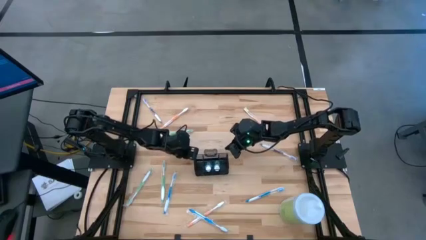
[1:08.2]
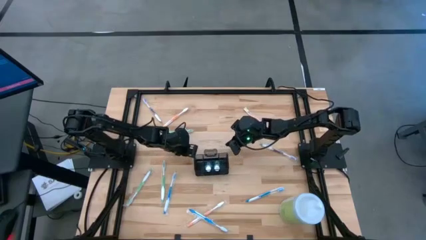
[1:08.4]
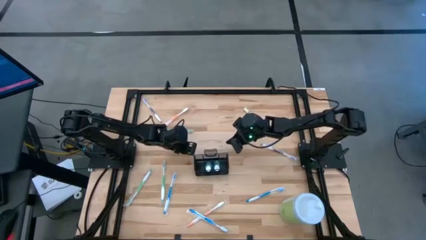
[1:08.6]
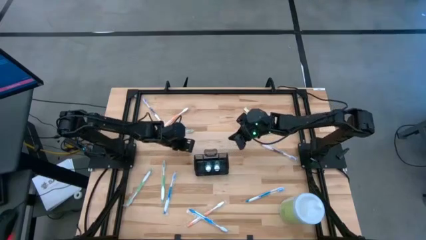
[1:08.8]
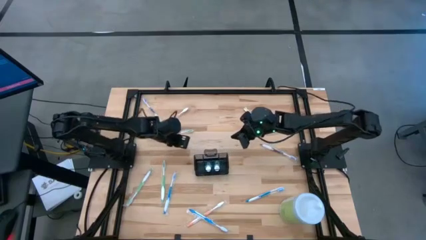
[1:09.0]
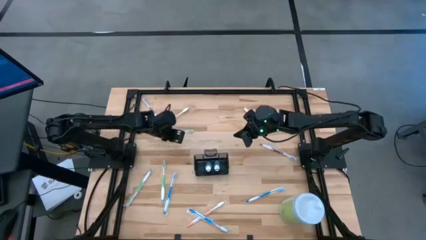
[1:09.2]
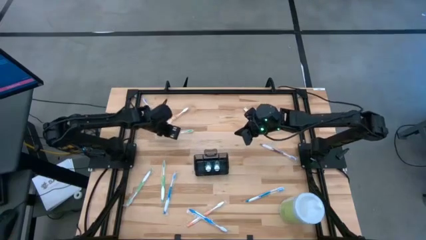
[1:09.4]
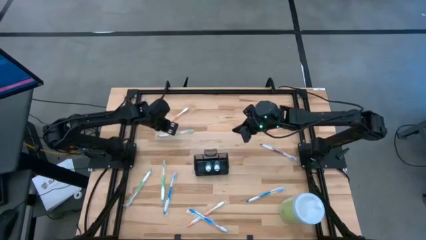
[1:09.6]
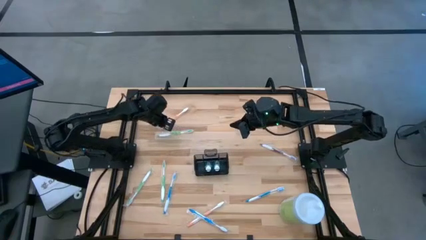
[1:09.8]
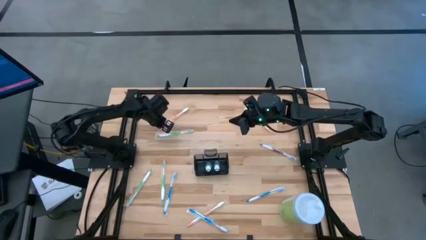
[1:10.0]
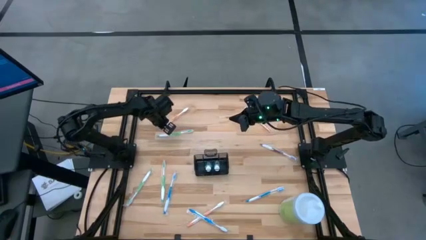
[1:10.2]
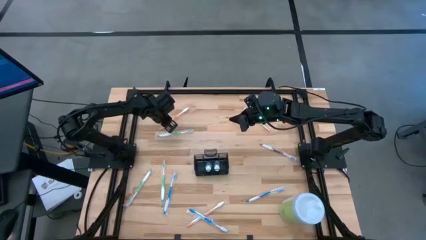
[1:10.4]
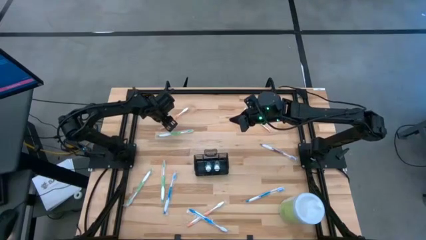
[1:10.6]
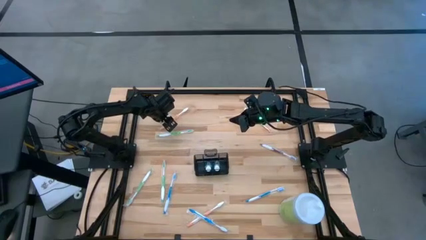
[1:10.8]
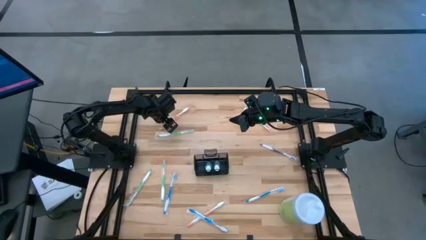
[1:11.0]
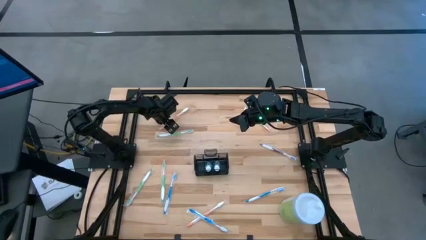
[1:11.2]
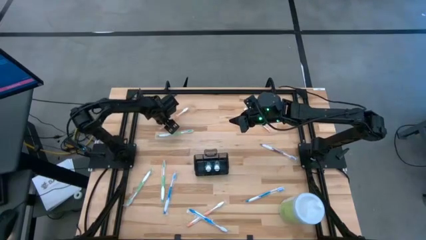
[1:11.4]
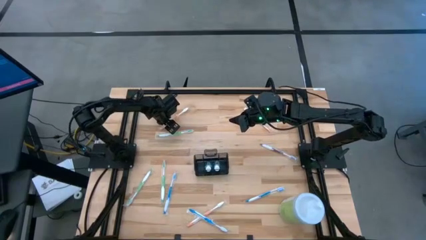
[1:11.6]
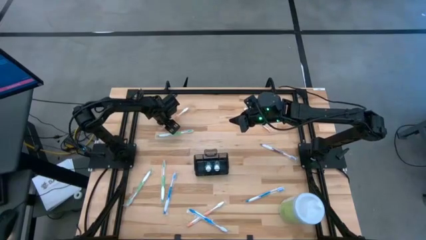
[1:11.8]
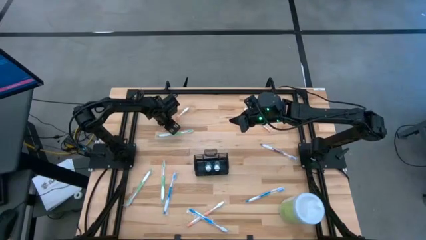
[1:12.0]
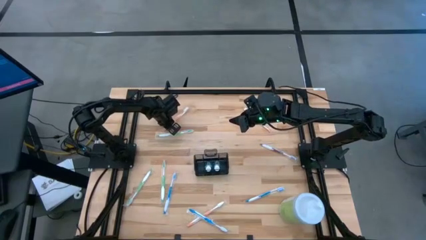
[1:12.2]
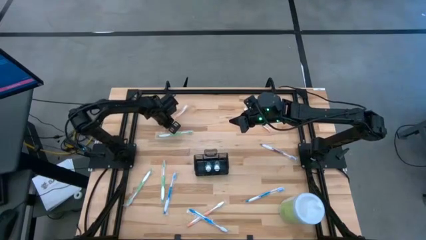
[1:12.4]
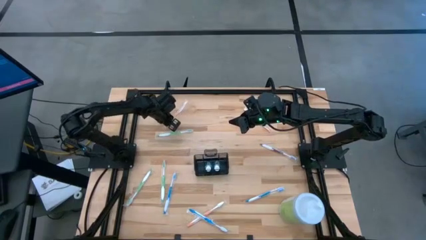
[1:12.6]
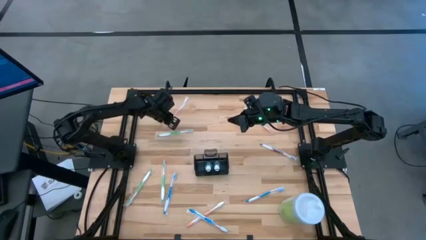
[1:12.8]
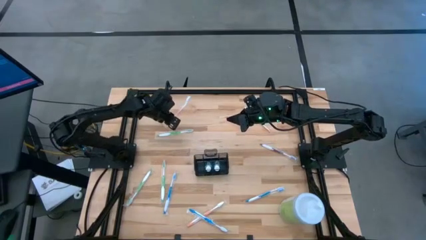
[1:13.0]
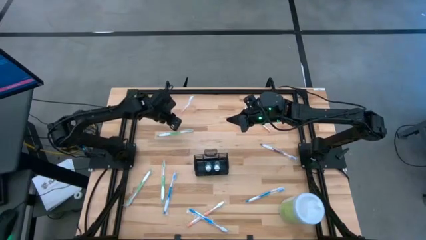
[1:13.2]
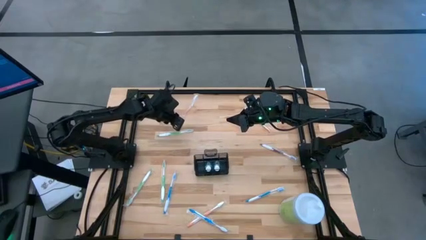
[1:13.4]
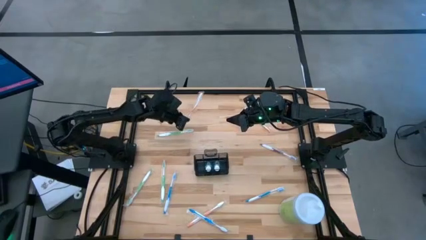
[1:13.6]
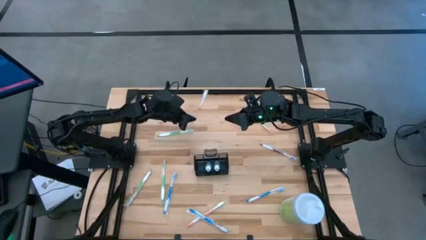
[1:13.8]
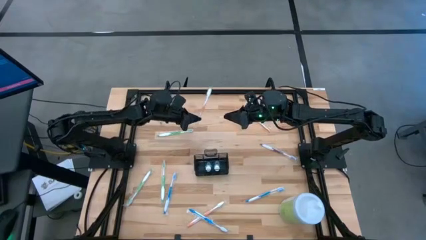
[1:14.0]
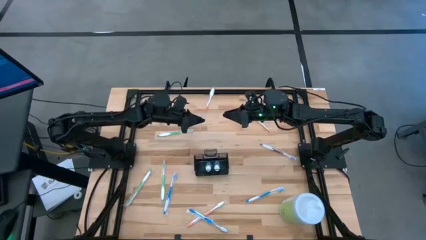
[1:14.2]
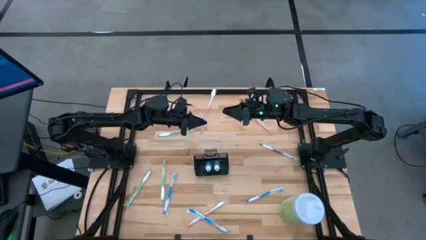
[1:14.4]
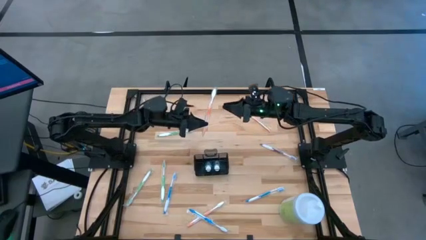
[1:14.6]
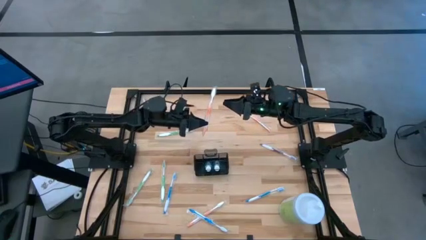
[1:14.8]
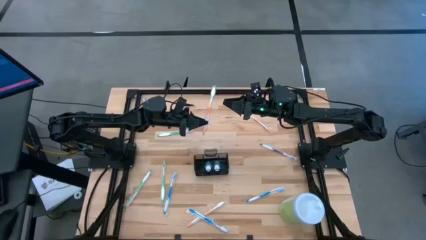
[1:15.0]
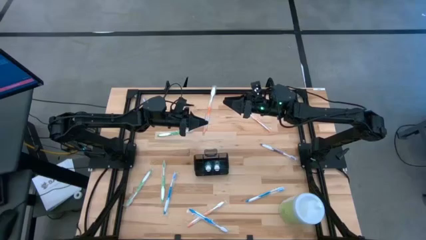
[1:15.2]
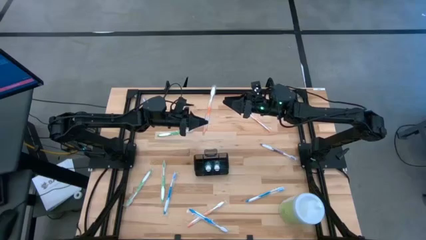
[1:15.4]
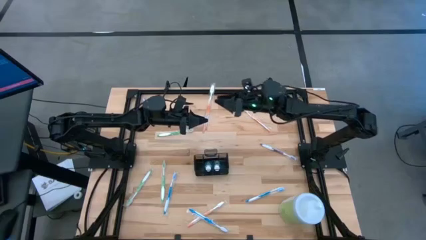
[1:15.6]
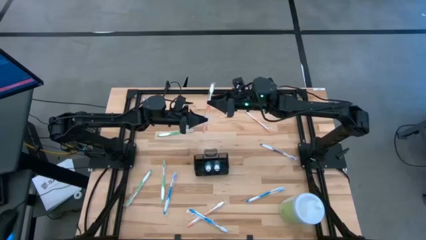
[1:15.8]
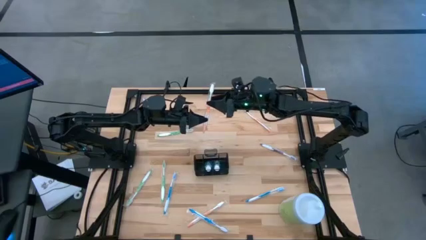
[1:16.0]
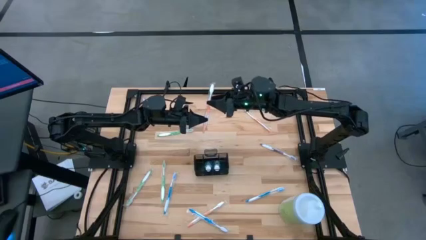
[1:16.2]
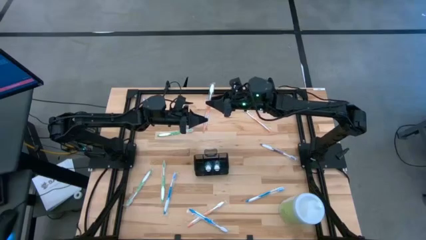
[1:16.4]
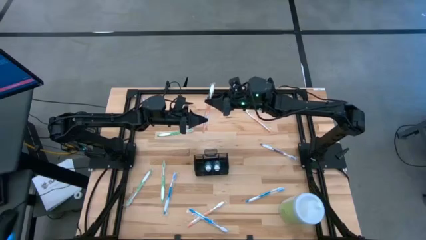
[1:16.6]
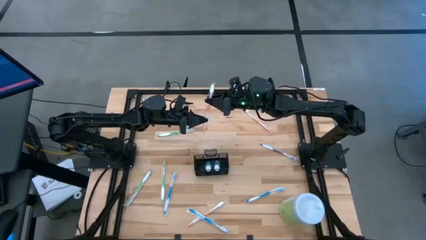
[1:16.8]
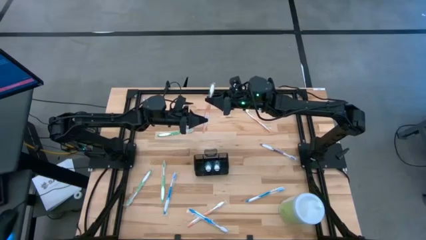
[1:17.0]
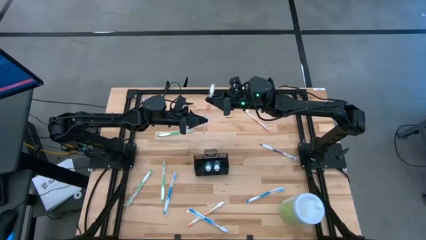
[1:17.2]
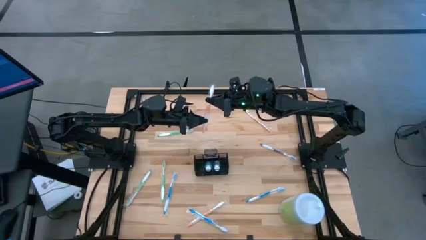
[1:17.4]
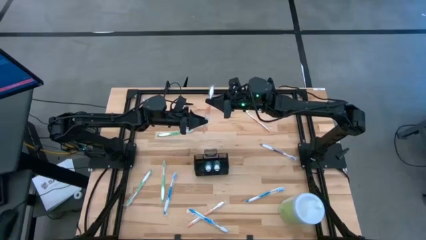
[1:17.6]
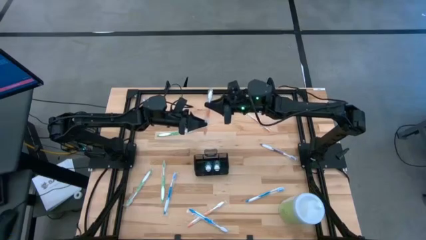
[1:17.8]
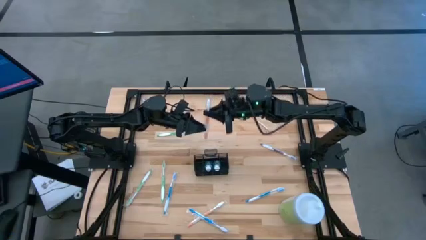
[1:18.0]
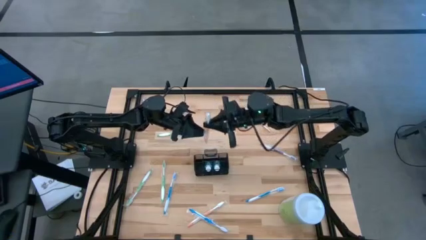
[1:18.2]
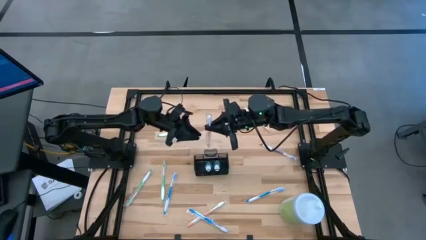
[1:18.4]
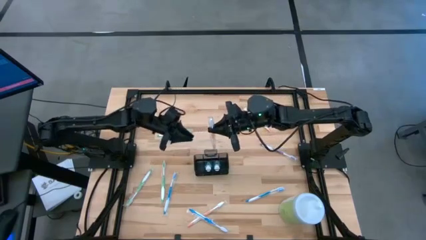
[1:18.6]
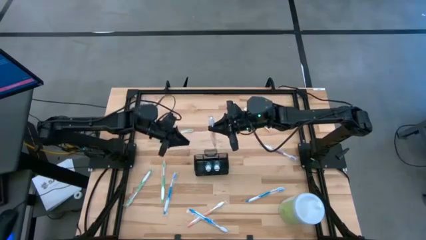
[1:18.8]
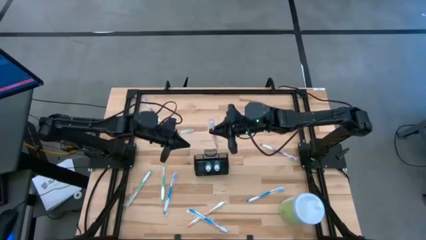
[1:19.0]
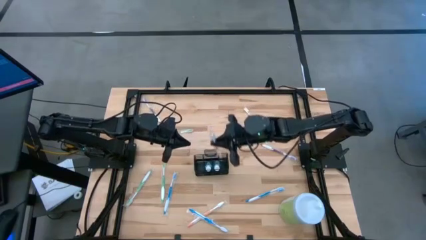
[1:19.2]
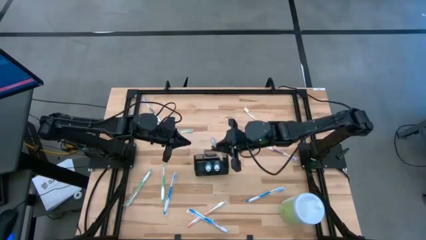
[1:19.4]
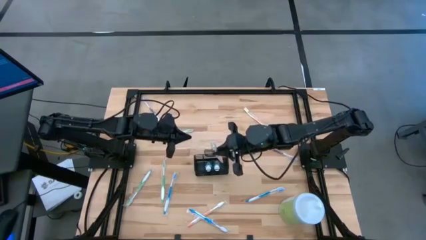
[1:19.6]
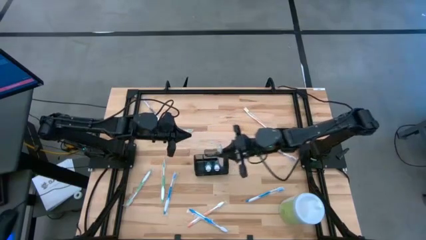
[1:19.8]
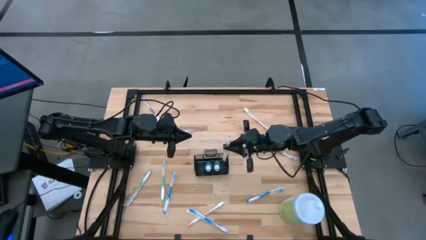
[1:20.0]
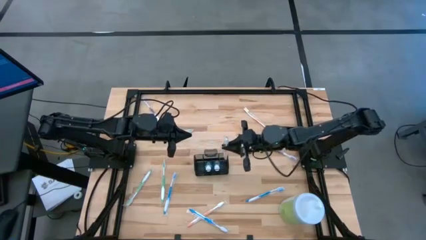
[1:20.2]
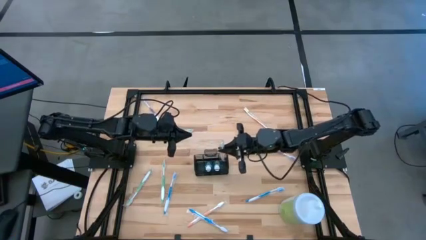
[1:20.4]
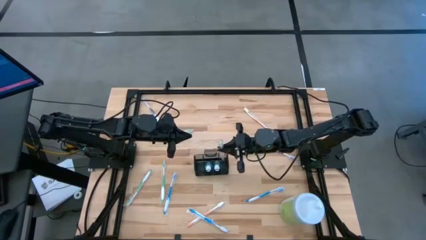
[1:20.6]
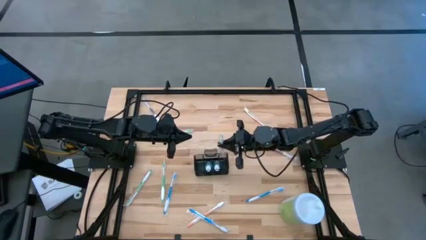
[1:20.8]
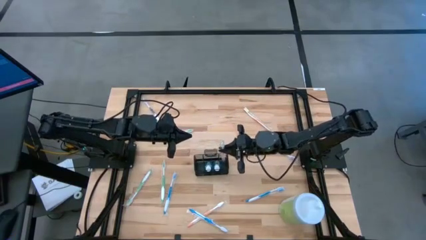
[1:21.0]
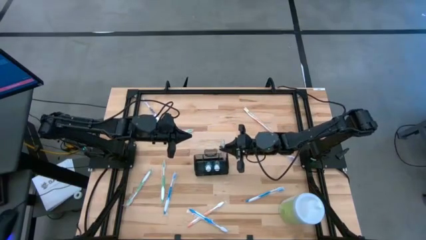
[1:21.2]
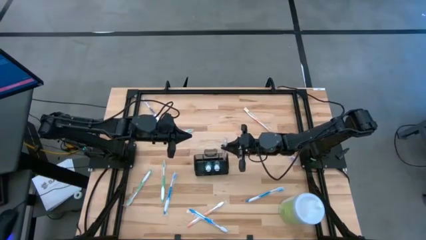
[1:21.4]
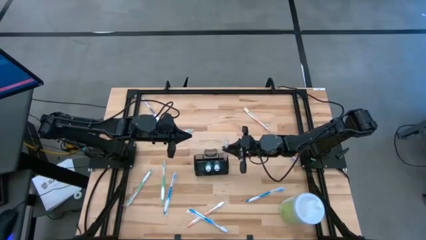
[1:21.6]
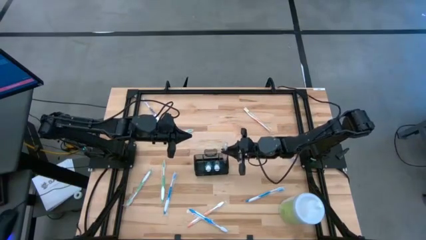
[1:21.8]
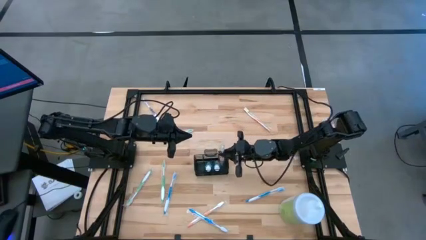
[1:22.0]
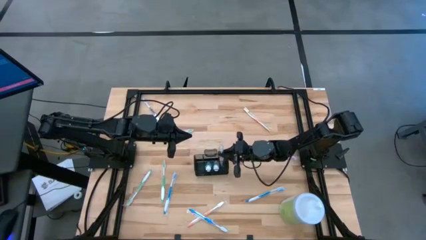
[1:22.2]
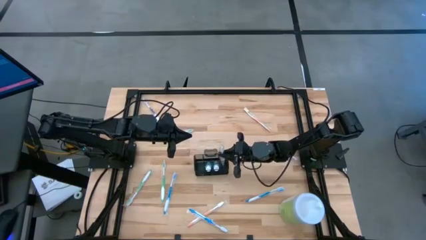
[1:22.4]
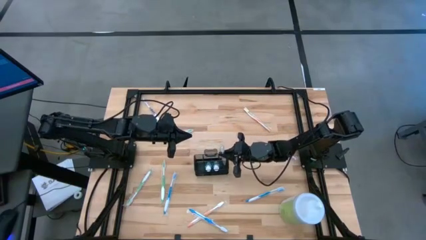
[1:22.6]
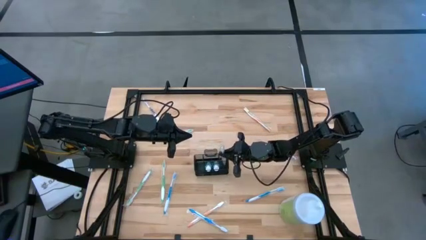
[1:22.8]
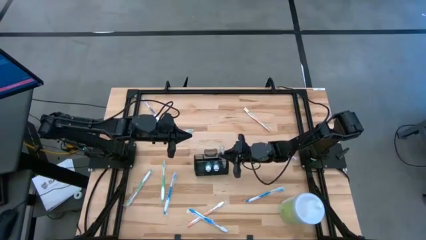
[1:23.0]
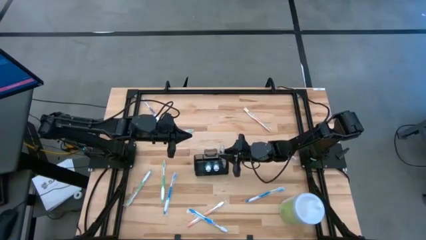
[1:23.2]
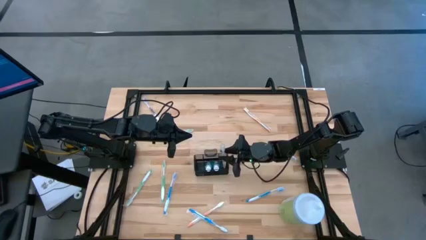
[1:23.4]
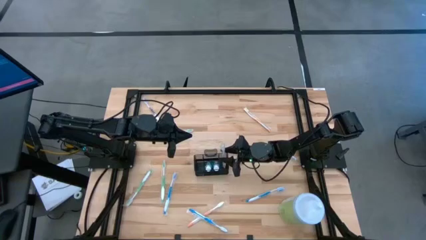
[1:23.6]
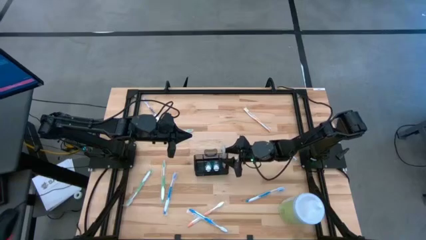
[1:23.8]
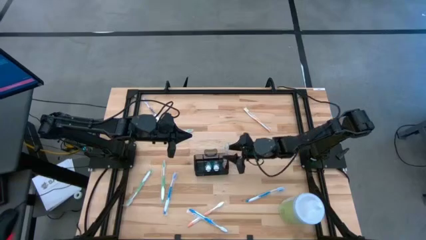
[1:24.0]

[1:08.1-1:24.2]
Task: Pick & Place toothbrushing station
Put the top left orange toothbrush into the top right section of the mesh organizer
